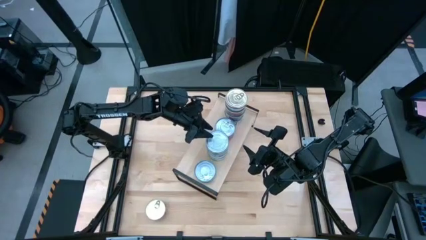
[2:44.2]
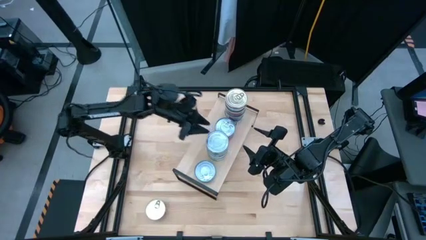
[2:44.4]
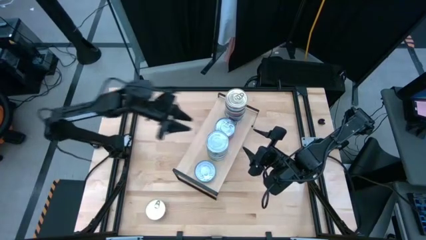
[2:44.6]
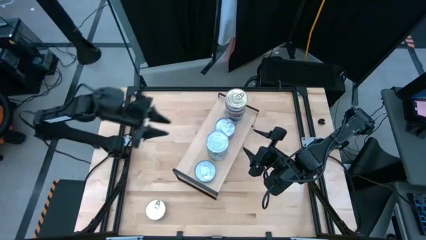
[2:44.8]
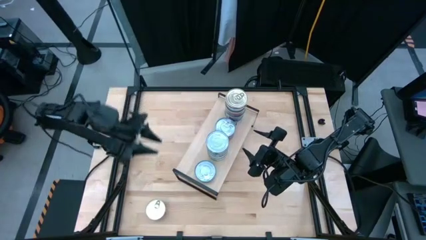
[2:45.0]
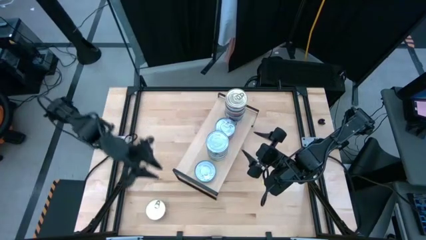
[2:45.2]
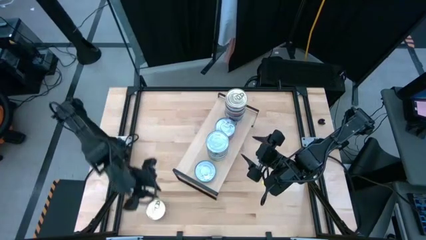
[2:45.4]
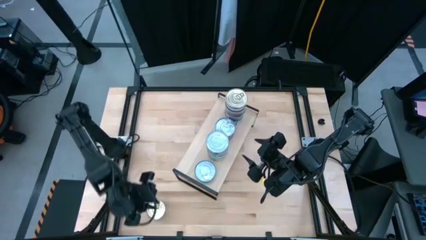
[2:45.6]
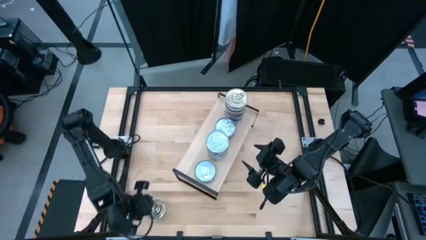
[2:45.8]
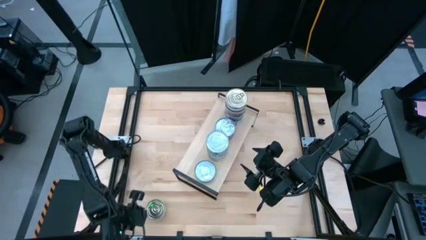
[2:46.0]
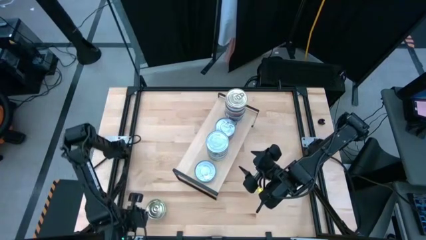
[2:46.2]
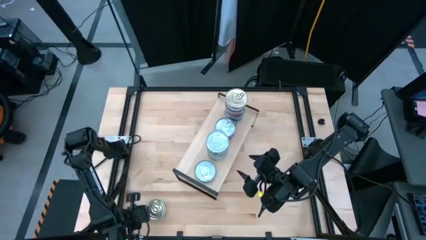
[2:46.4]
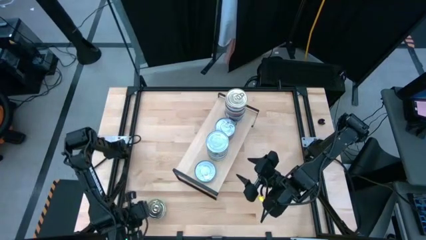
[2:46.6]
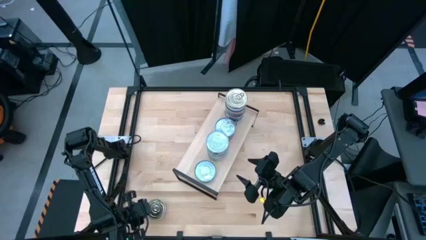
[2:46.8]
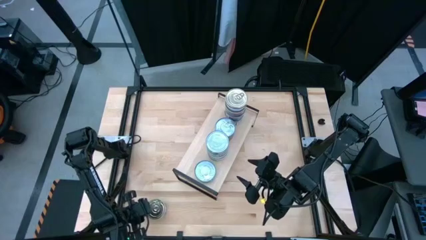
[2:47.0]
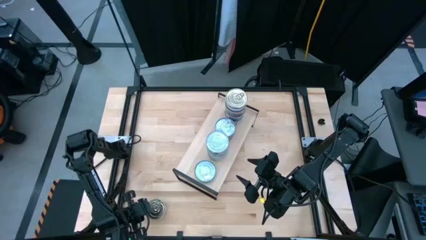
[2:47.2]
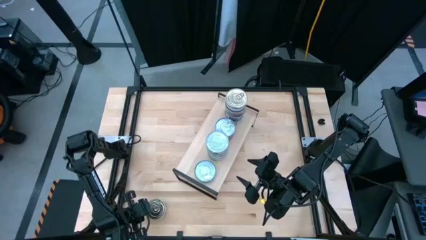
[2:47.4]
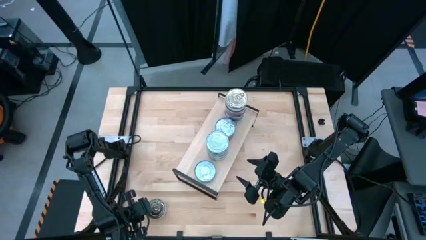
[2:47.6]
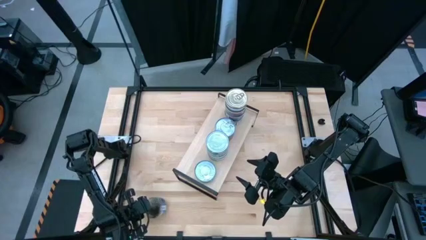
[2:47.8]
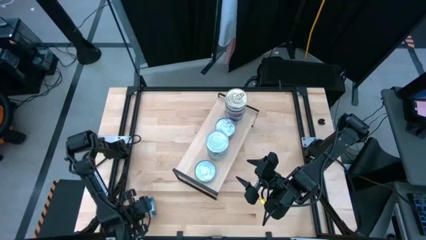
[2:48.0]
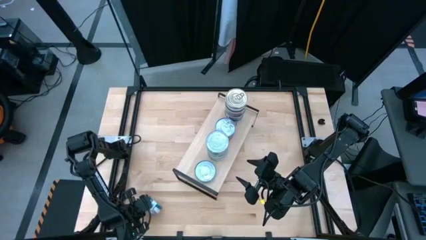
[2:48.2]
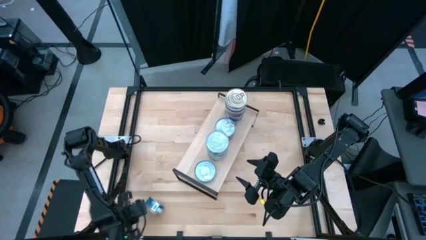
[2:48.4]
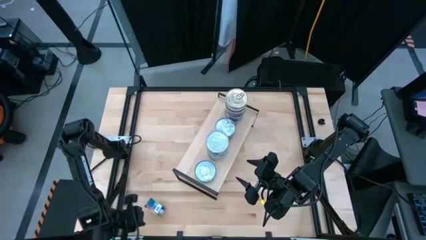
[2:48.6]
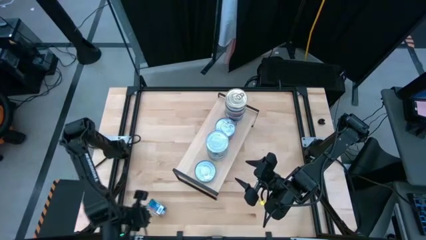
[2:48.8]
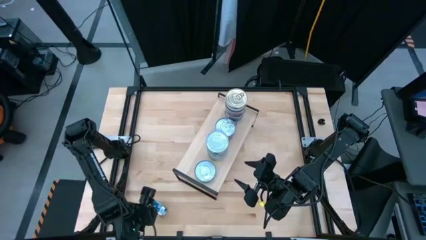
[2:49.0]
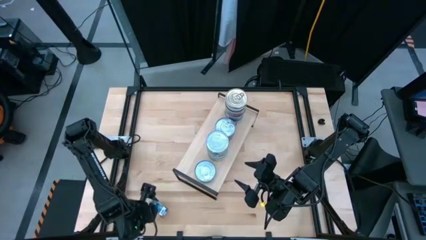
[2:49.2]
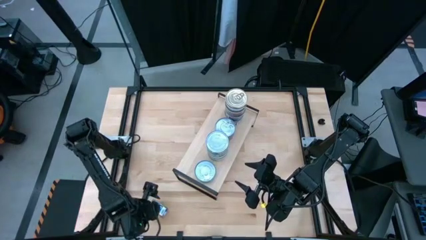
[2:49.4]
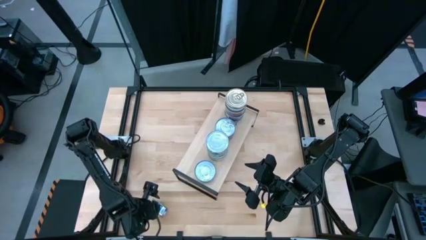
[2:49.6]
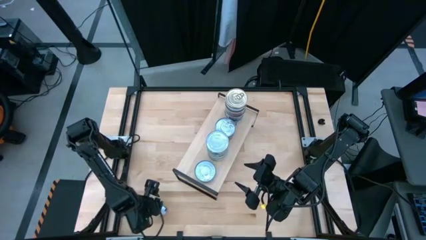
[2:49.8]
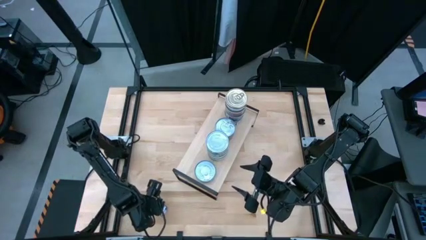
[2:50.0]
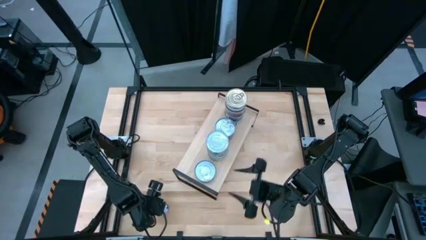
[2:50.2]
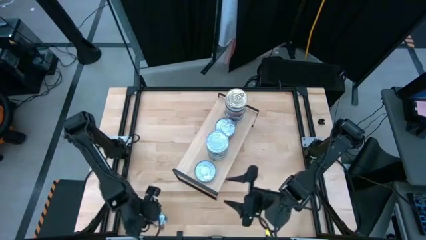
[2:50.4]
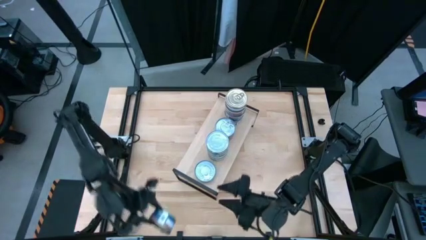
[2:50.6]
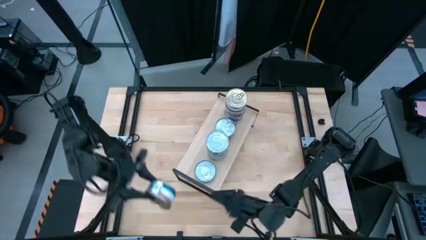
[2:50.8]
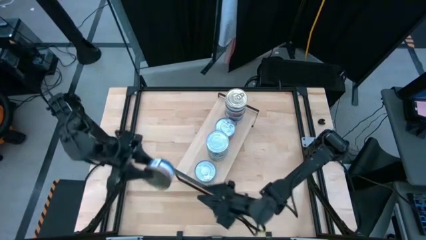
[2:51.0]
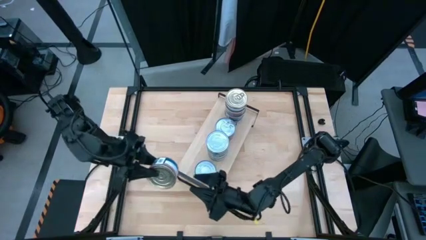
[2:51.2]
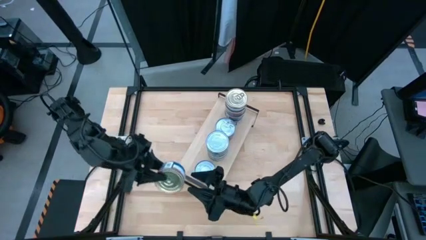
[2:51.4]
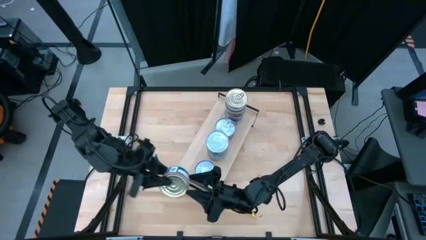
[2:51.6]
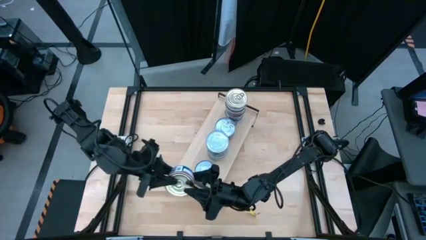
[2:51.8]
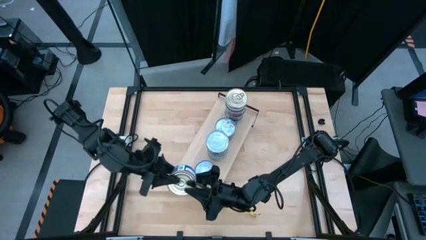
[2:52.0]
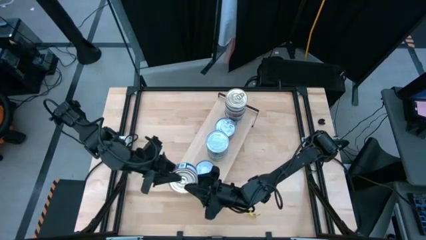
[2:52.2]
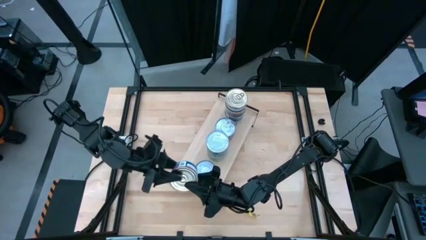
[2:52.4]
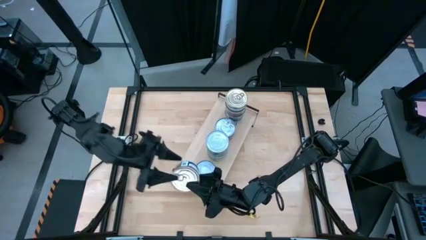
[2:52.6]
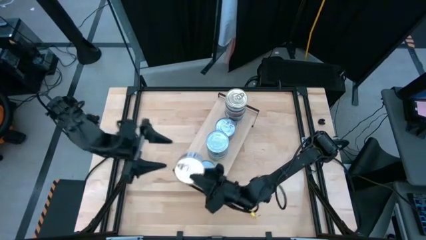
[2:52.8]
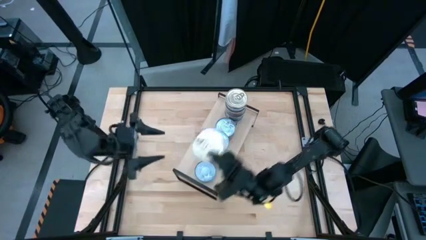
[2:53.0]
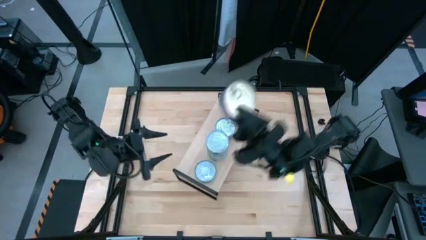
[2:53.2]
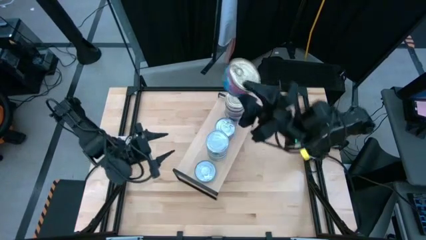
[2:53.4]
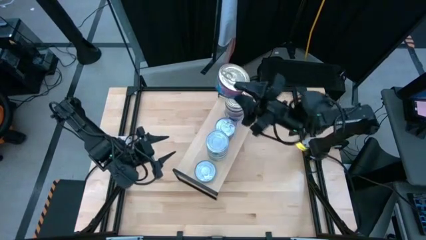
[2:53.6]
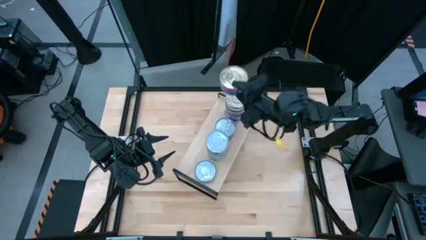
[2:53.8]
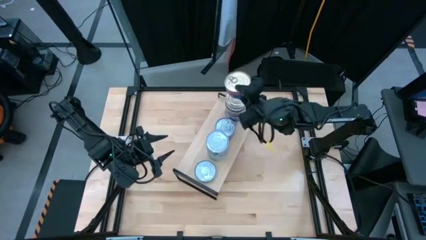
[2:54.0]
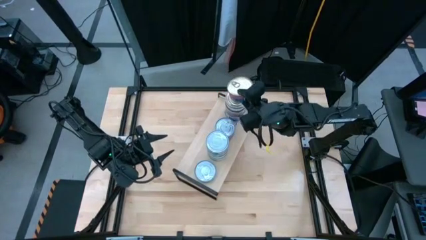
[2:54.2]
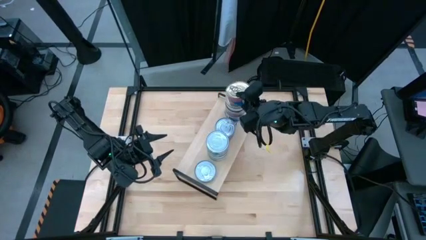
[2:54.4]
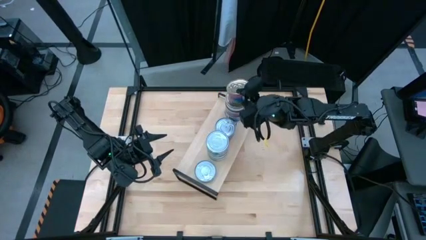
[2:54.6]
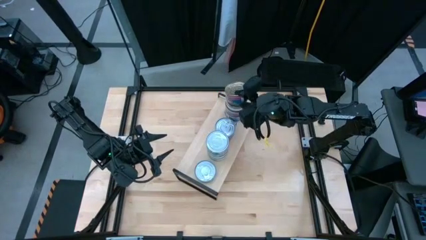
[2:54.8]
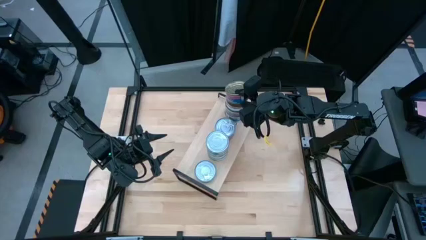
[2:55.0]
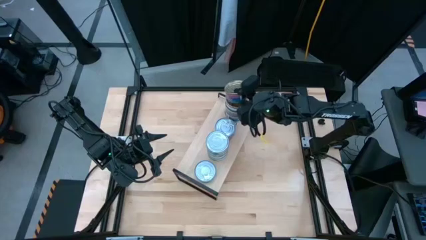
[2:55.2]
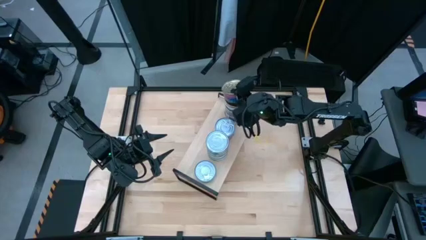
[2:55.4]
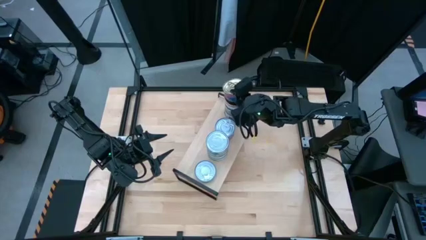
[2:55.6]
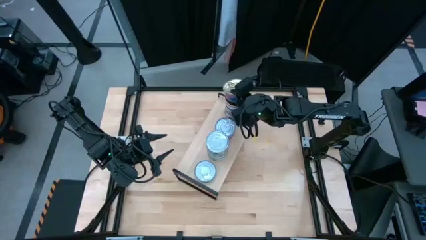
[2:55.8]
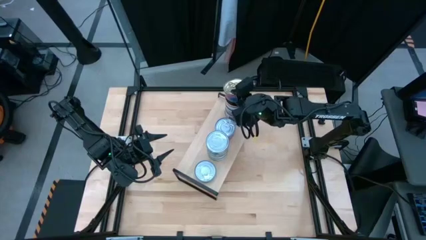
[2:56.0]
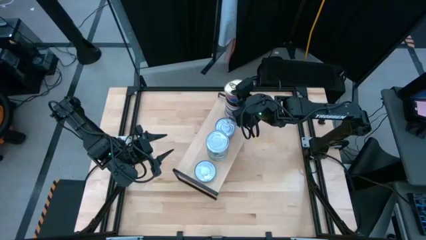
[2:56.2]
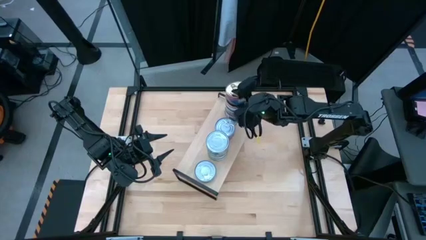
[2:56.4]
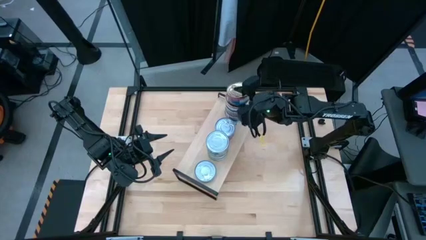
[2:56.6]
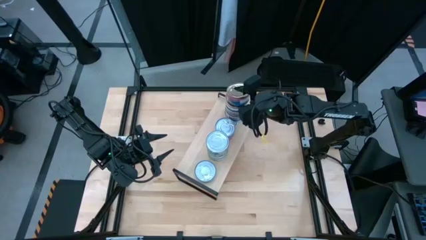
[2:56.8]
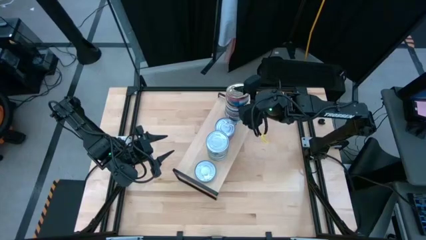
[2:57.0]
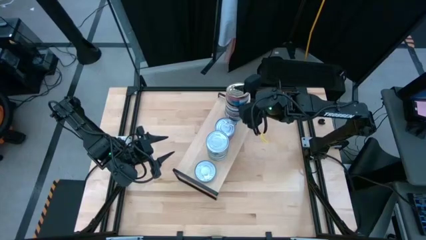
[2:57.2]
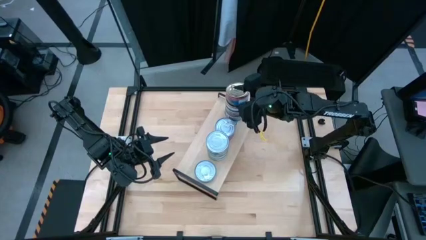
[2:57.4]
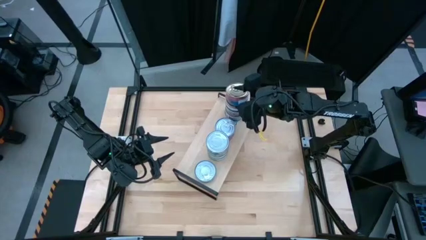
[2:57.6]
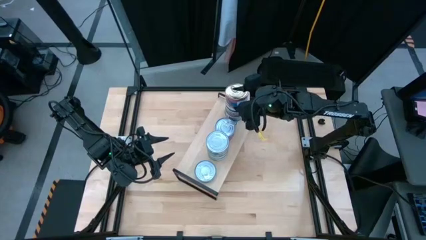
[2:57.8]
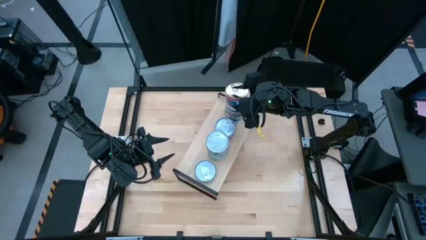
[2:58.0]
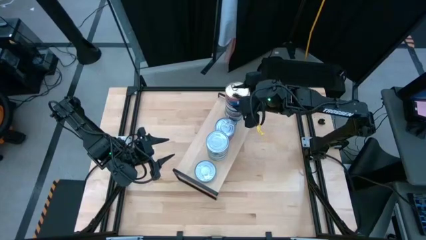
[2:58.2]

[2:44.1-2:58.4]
Task: Stack canned seafood by type on shelf
Stack the blue tuna can on top of the blue tuna can on the shelf

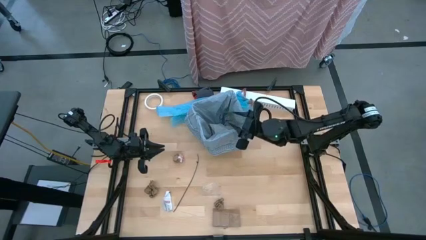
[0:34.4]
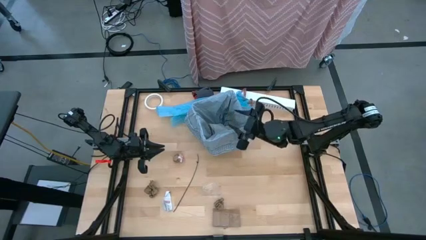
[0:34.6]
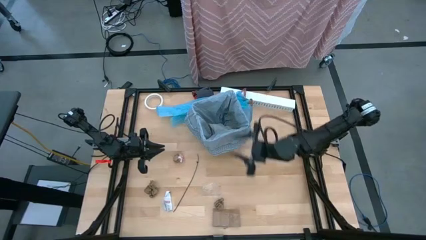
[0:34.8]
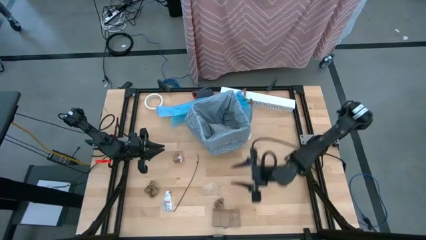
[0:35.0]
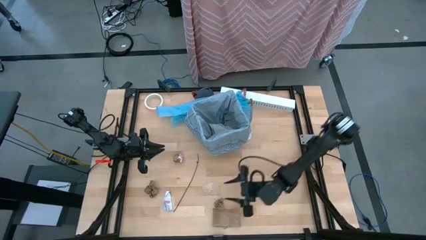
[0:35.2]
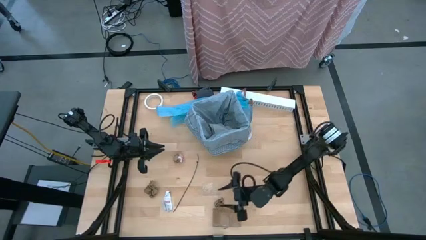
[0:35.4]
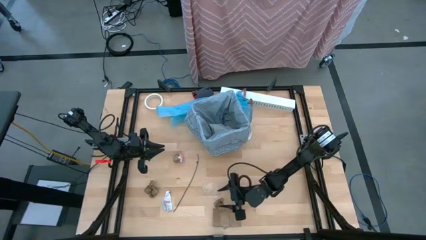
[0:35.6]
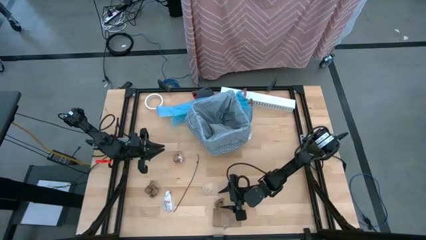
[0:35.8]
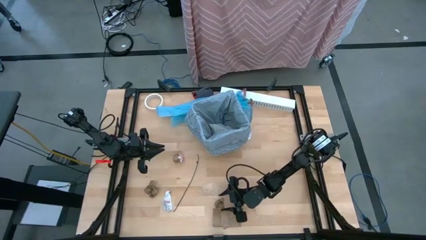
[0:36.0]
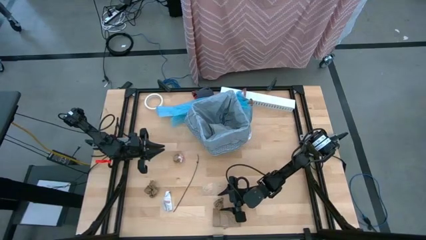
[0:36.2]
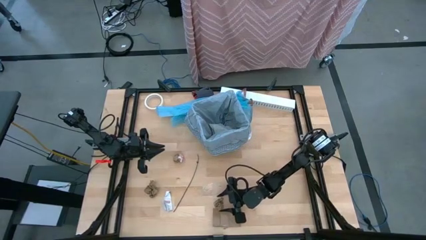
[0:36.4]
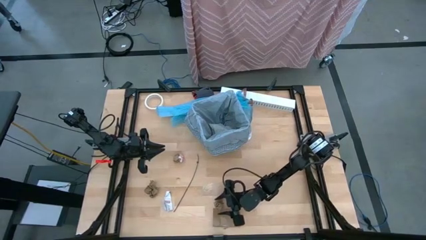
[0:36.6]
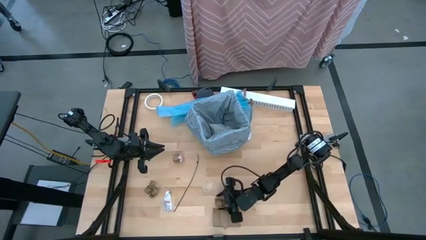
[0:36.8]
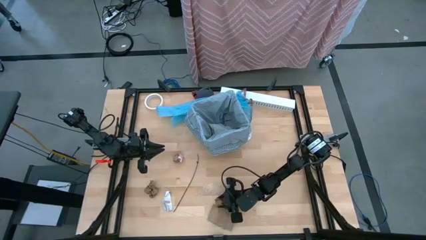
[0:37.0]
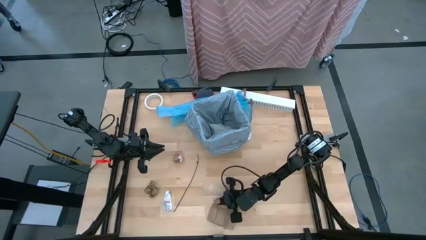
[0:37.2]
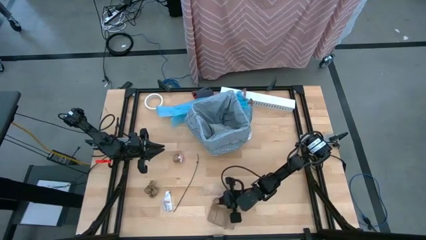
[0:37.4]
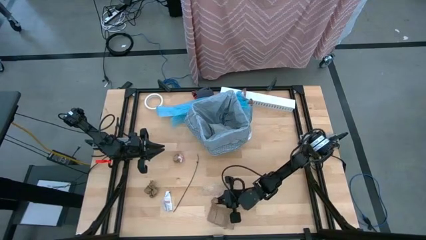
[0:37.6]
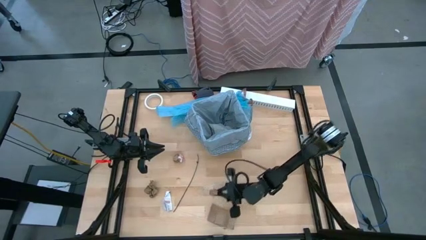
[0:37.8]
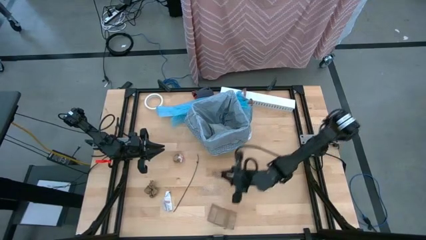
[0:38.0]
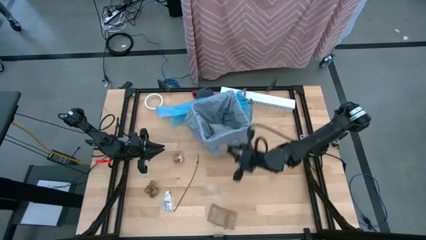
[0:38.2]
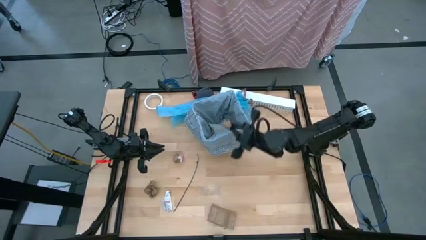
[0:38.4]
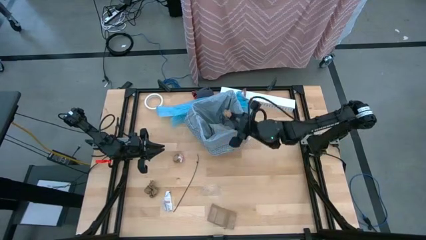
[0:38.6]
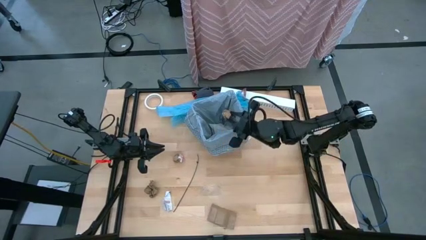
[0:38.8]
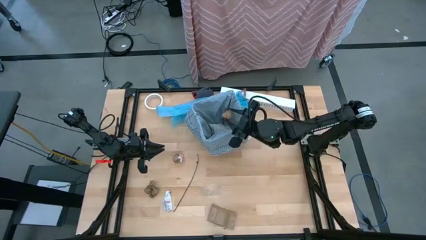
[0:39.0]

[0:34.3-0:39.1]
Task: place trash/remove bag and relplace
Put the brown napkin inside the black trash bin
